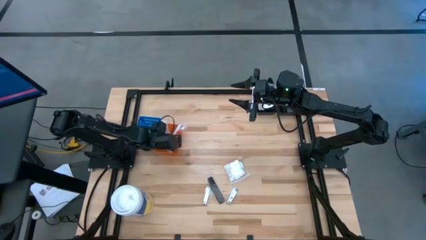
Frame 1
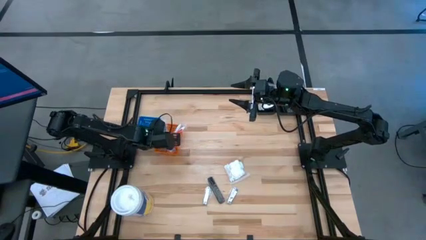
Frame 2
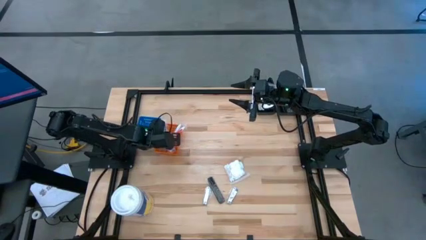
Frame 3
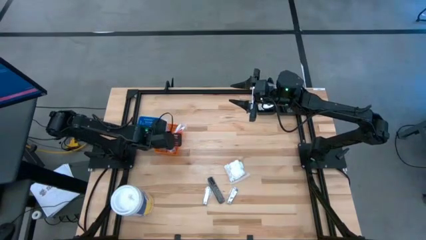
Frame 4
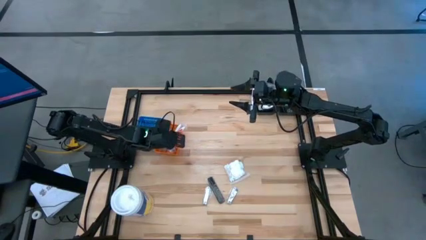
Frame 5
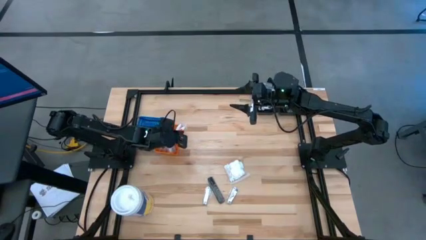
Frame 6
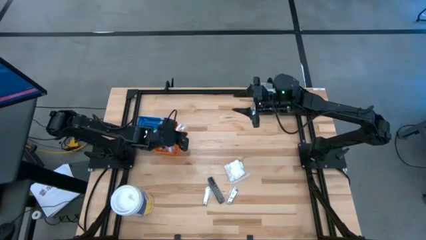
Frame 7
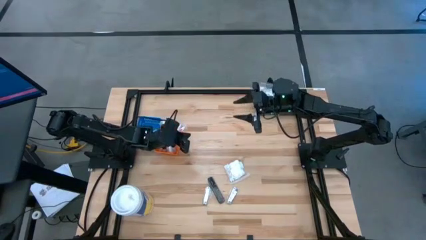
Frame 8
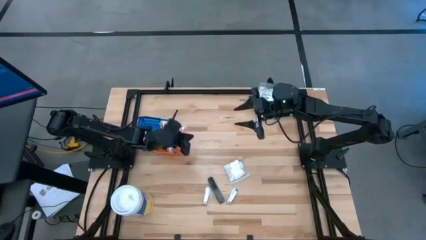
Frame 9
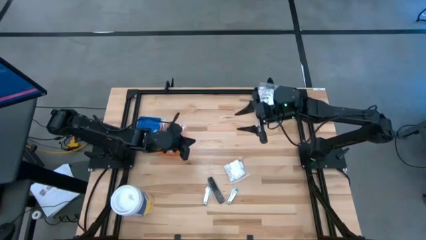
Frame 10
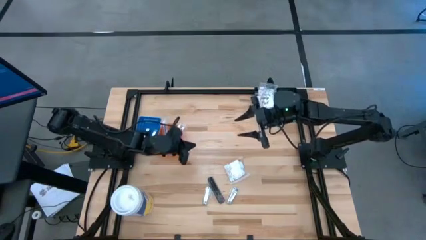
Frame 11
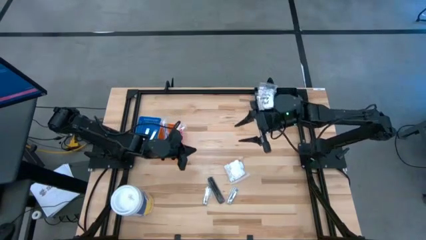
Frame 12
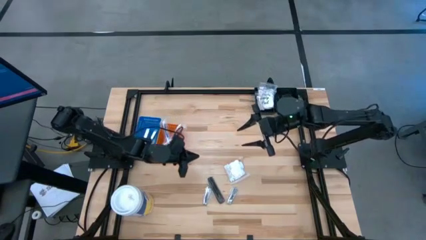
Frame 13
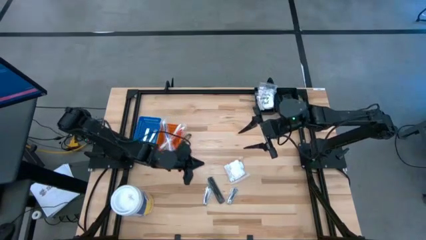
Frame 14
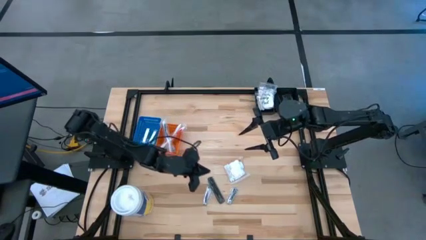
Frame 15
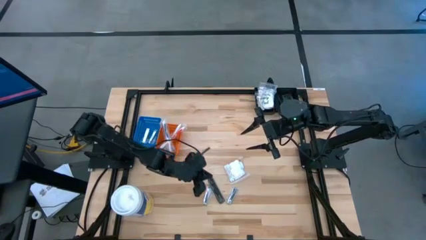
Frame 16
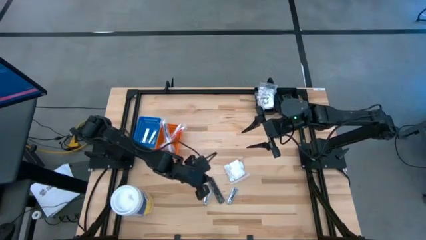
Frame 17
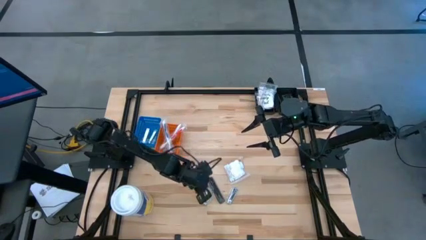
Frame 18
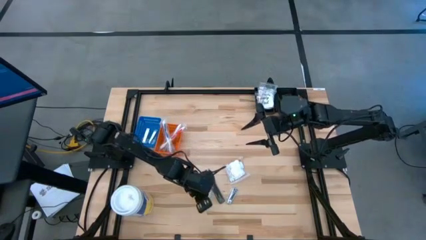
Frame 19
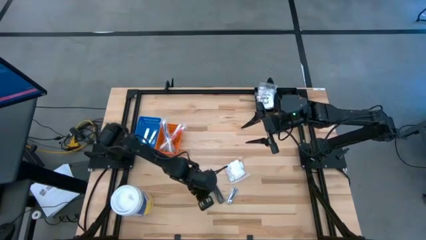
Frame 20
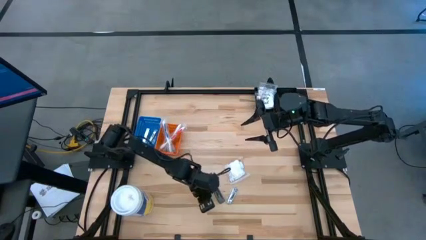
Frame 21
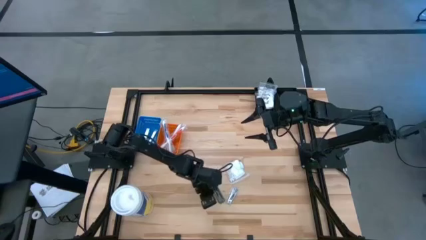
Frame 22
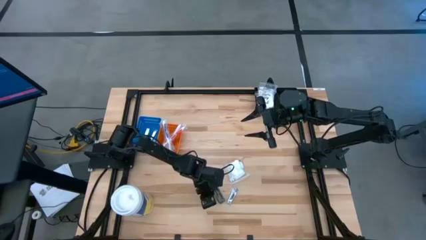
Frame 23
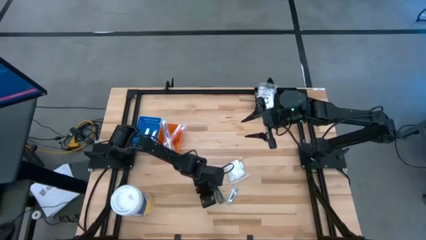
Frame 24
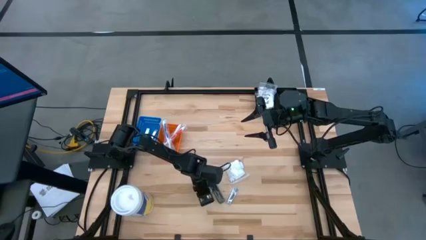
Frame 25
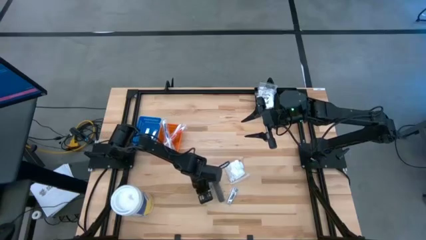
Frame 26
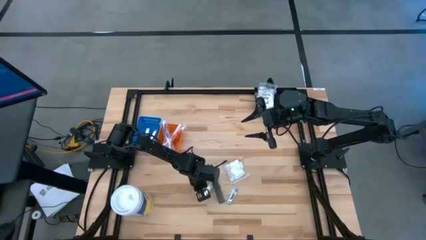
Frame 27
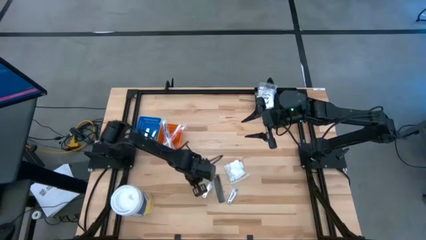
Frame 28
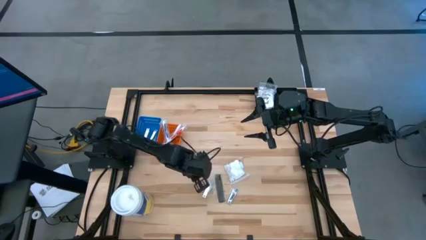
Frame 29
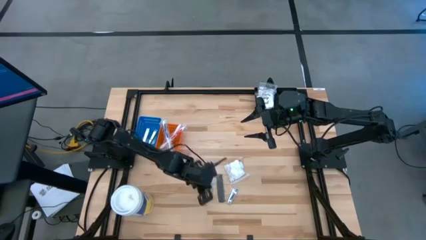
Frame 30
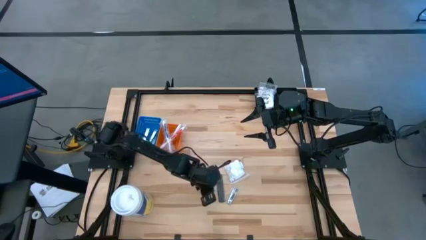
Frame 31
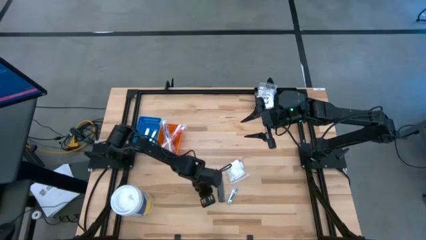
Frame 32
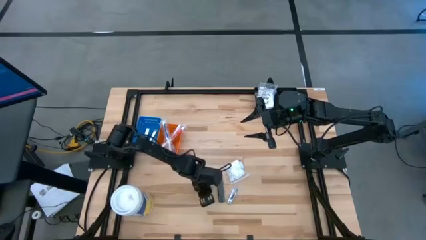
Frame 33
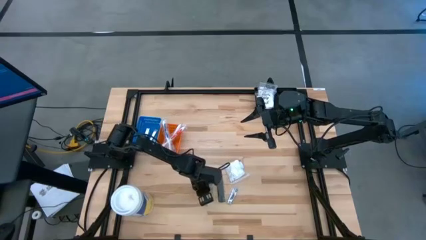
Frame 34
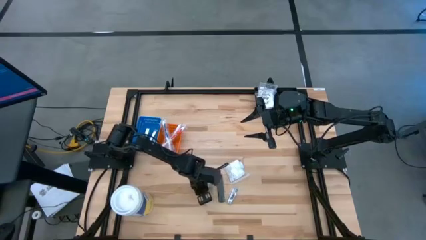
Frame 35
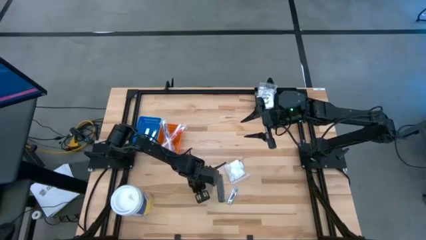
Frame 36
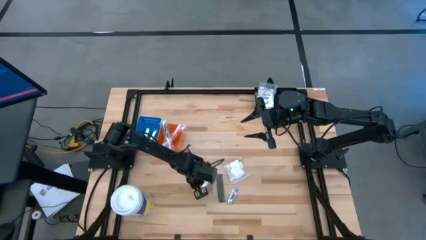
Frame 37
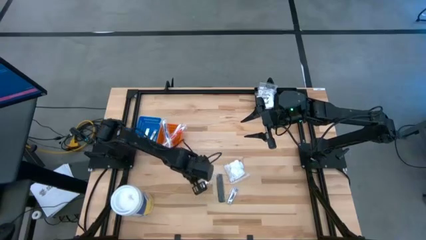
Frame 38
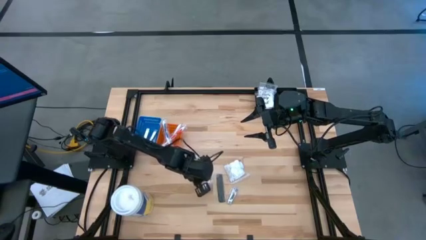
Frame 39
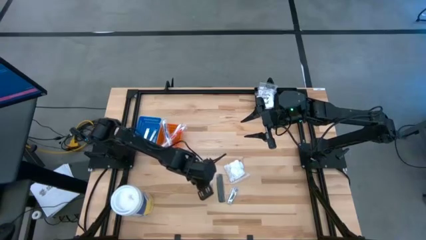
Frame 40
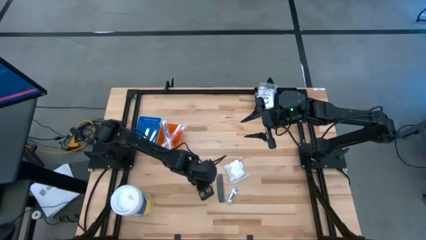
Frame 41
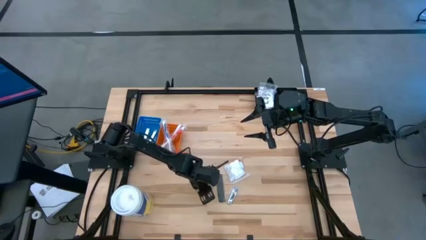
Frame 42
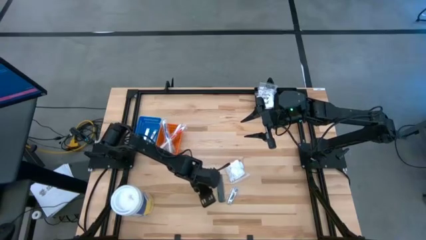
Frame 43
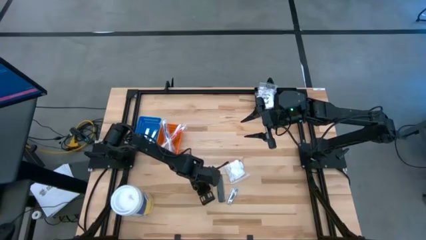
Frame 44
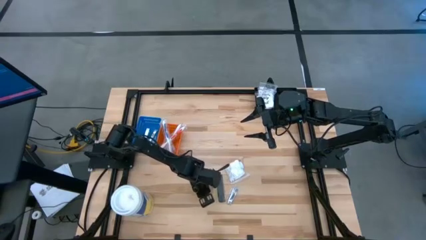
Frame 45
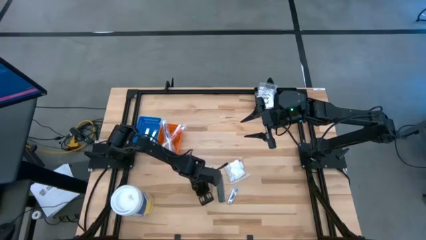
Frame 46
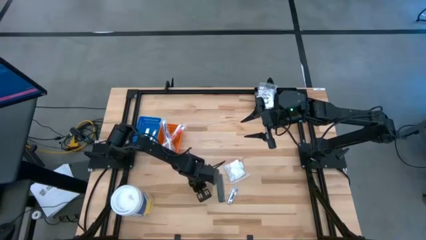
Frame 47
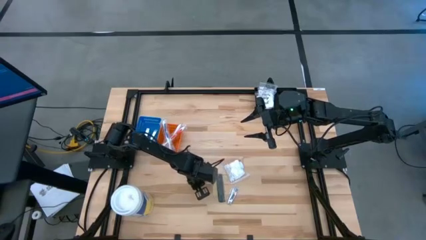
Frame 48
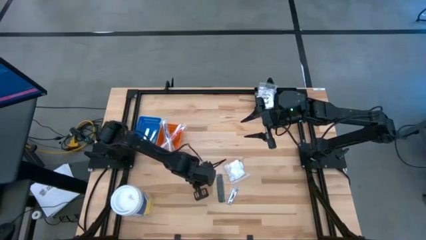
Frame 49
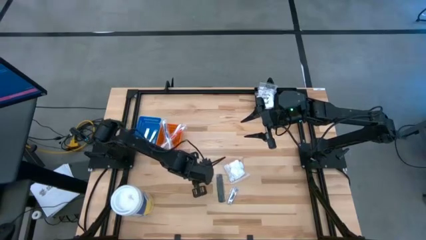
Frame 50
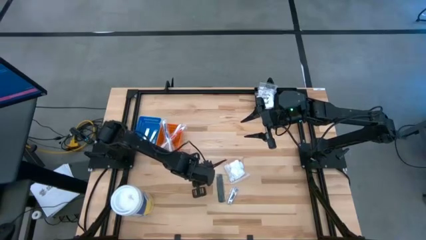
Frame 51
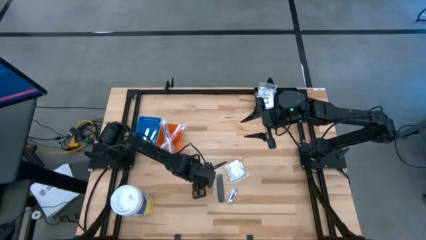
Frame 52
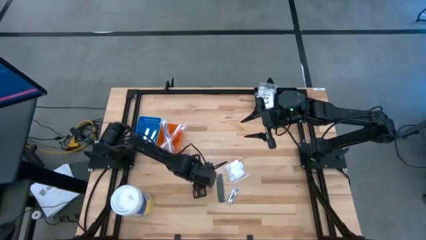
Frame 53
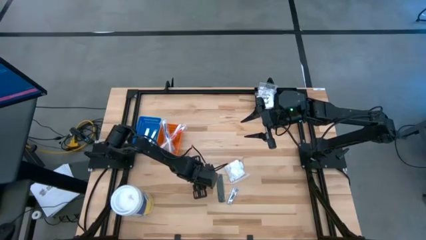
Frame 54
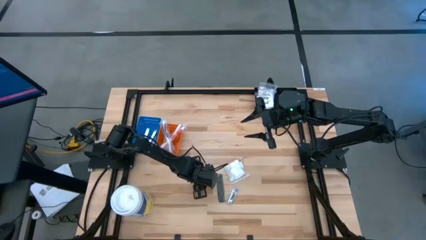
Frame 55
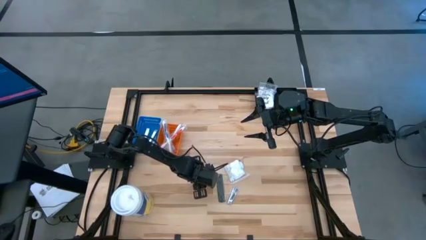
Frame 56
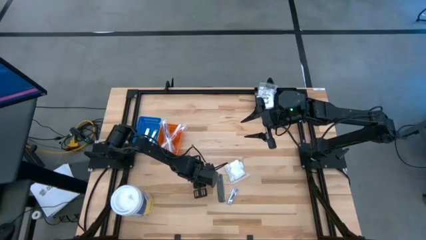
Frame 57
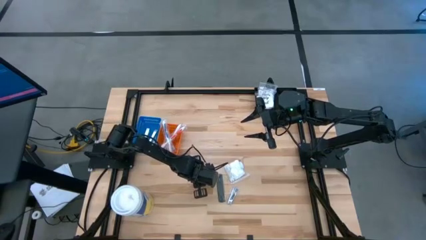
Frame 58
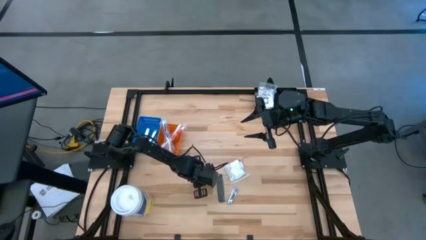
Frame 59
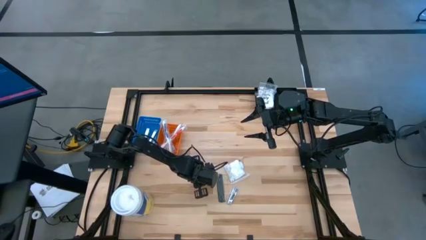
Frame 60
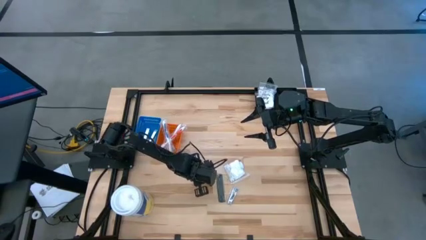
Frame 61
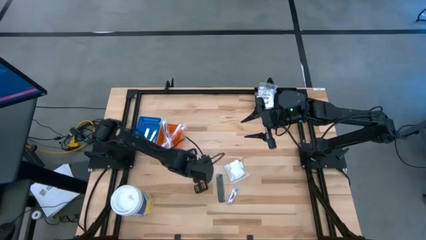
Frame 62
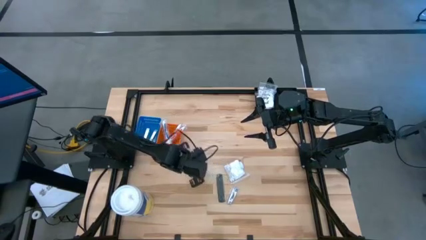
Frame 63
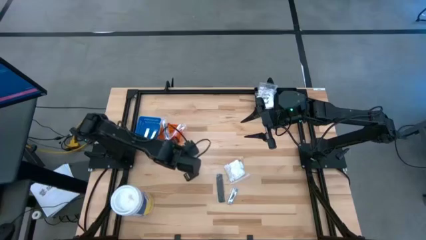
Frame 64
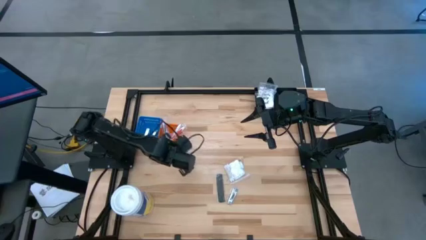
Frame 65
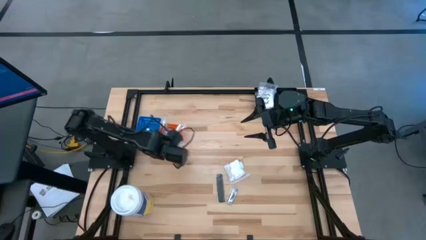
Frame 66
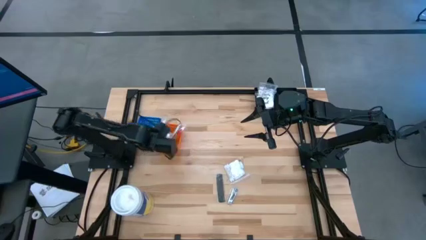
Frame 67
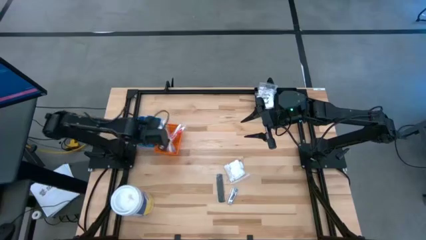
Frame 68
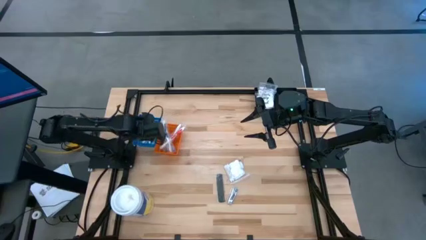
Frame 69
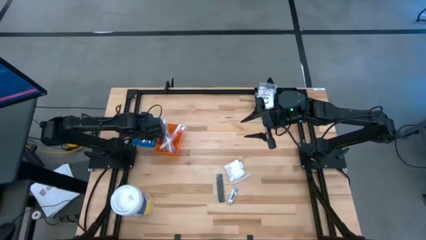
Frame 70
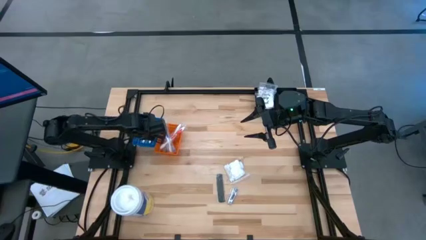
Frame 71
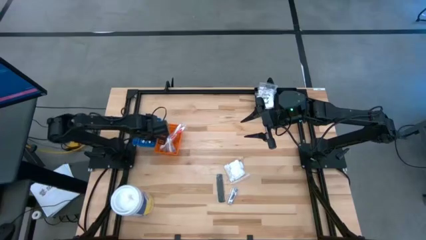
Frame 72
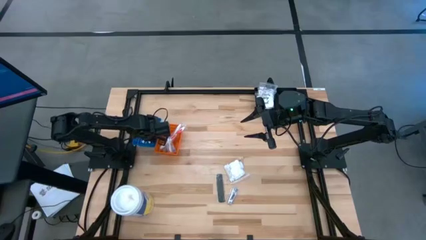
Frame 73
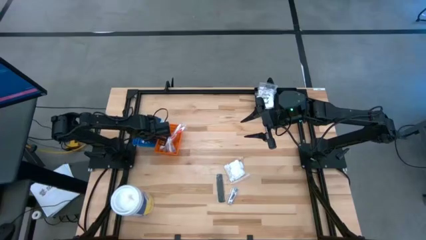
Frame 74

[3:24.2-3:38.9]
Task: Pick & Place Travel size toiletries
Put the silver nail cutter into the blue bin

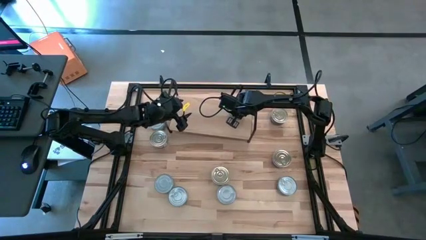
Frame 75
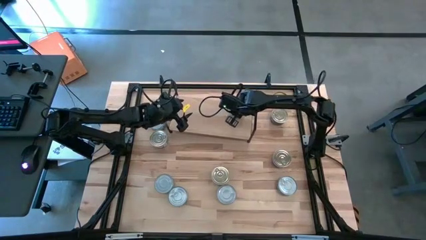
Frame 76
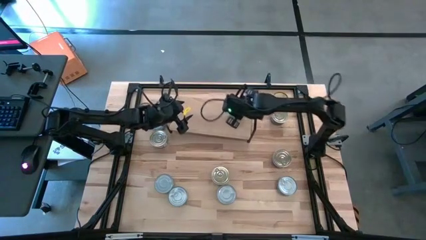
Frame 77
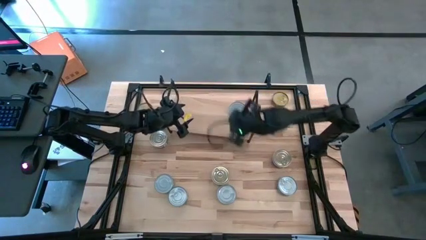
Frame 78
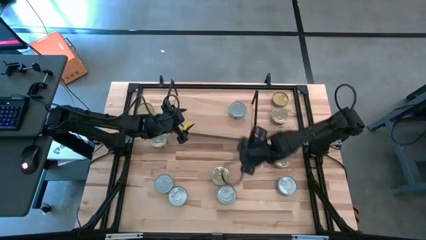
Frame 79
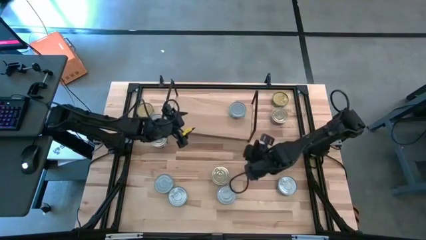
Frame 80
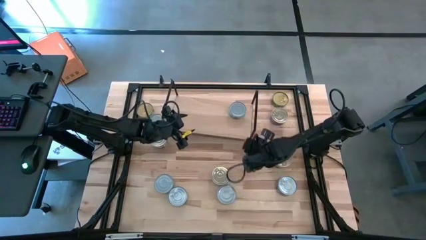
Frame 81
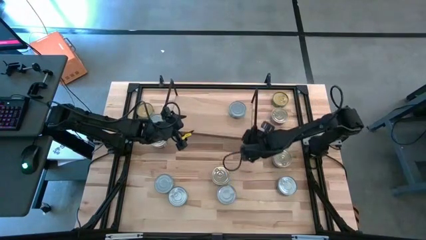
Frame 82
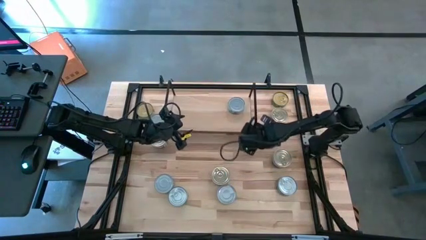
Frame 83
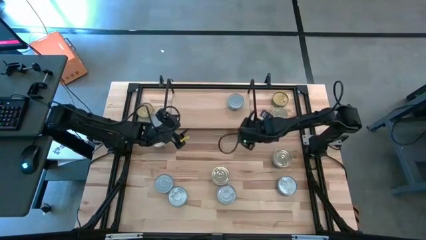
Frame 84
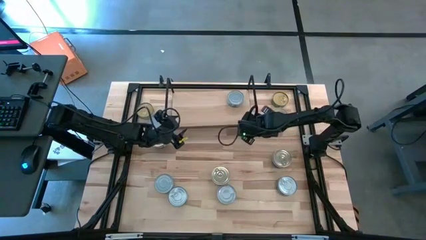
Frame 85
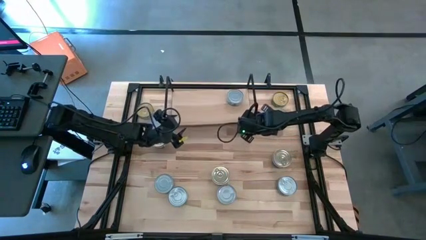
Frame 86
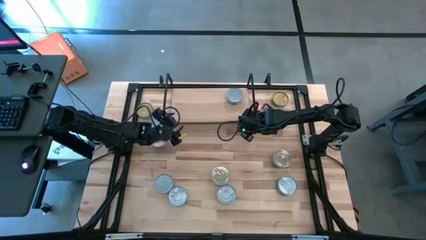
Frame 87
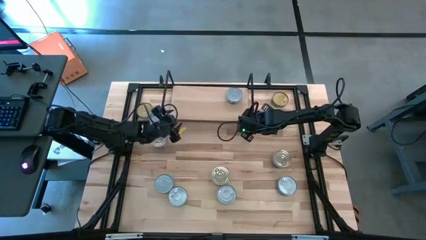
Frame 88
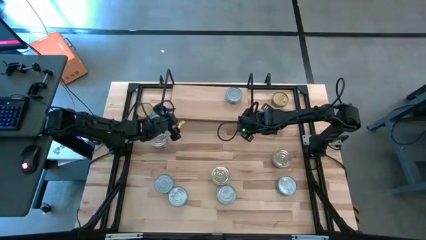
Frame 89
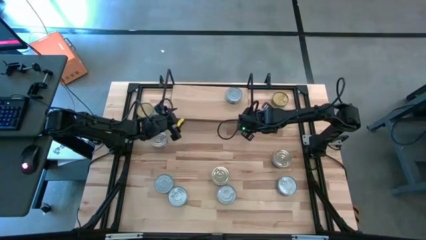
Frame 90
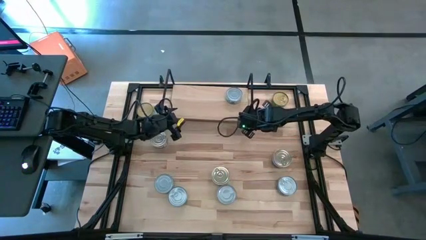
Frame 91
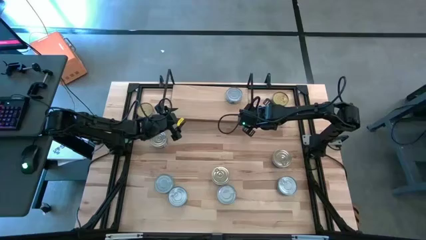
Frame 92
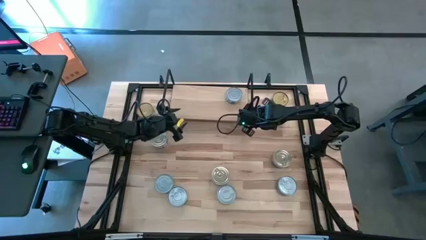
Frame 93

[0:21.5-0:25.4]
Task: Stack canned seafood by type on shelf
Adjust the shelf on the table
